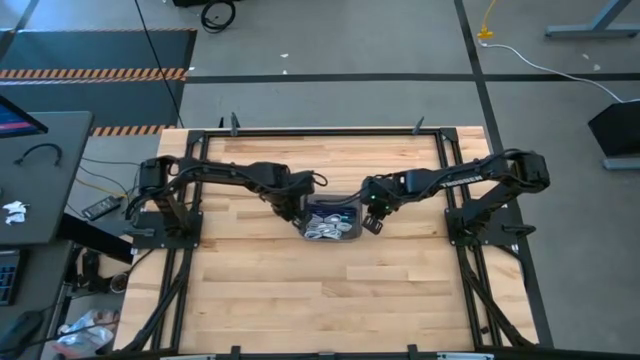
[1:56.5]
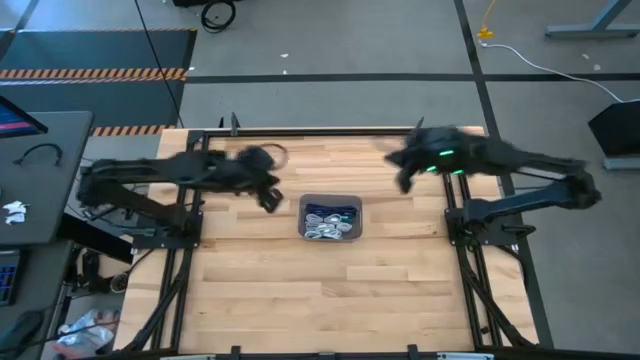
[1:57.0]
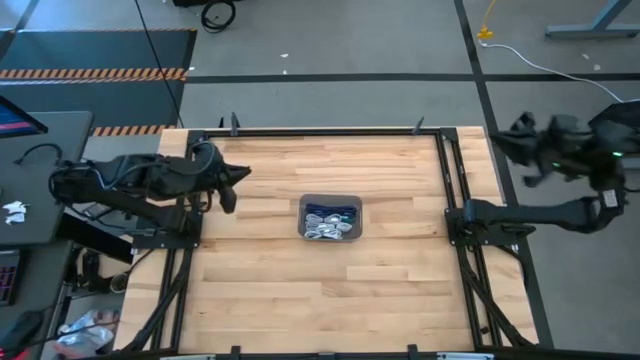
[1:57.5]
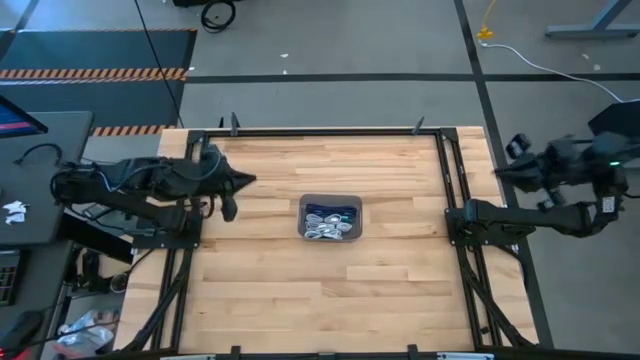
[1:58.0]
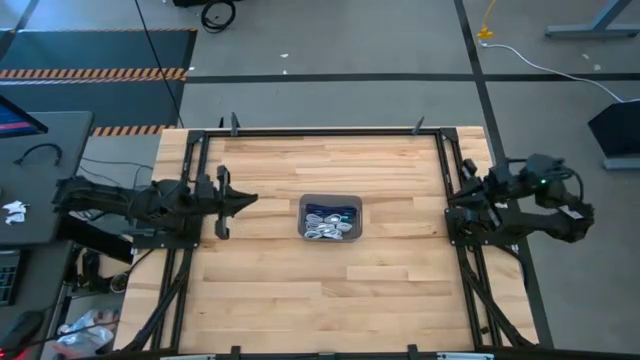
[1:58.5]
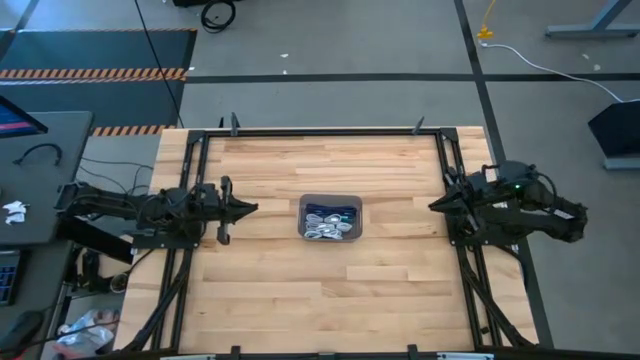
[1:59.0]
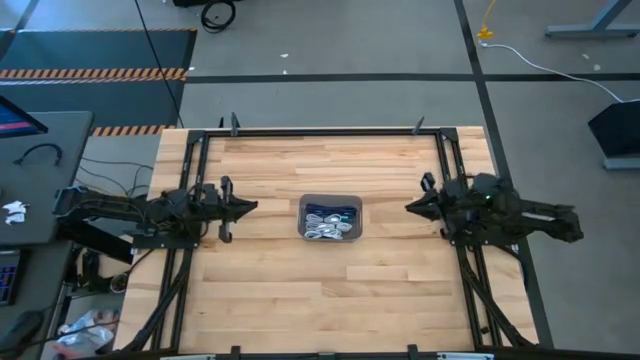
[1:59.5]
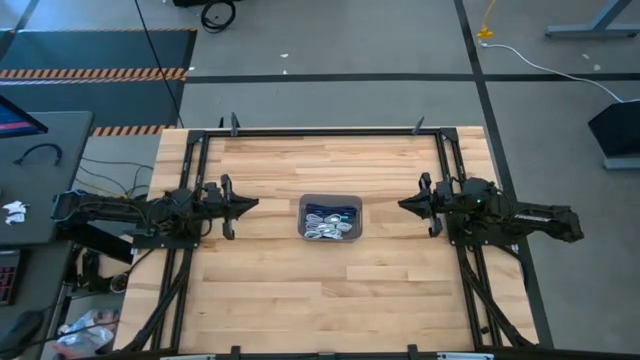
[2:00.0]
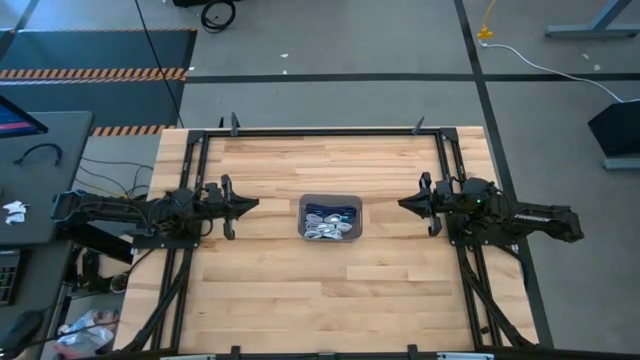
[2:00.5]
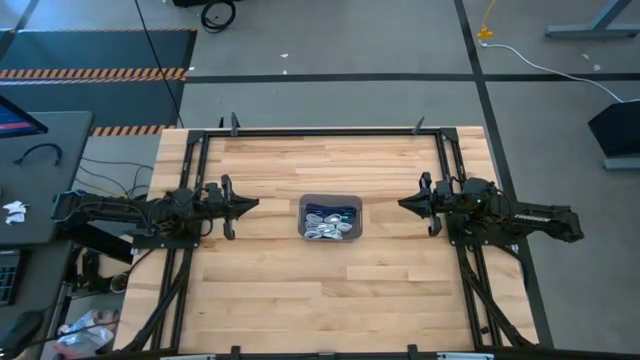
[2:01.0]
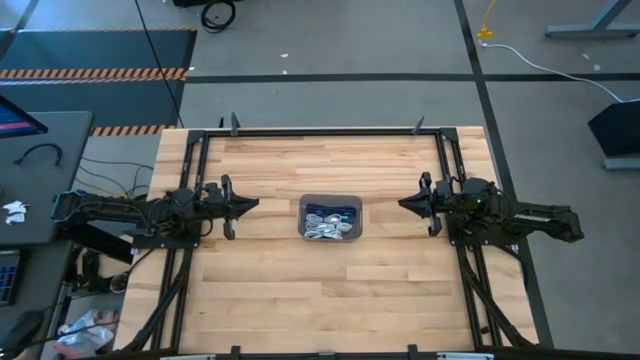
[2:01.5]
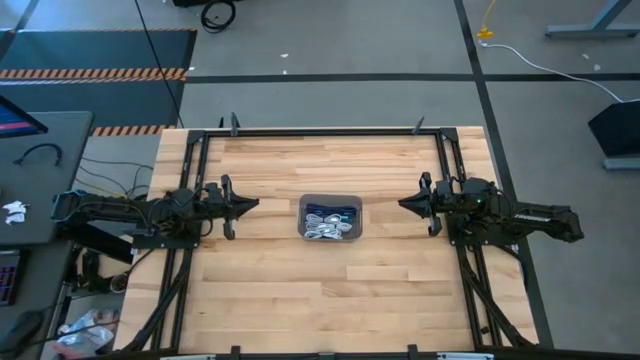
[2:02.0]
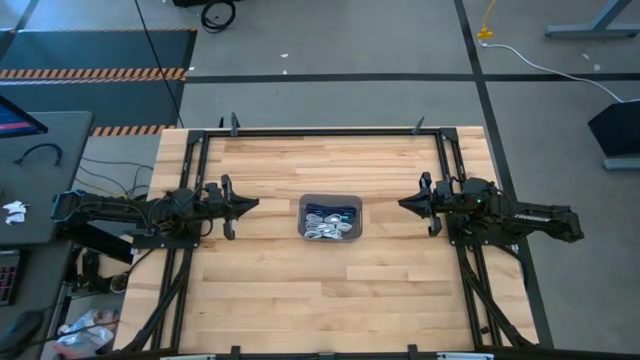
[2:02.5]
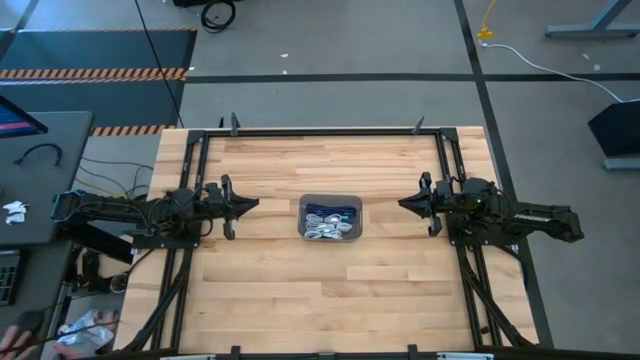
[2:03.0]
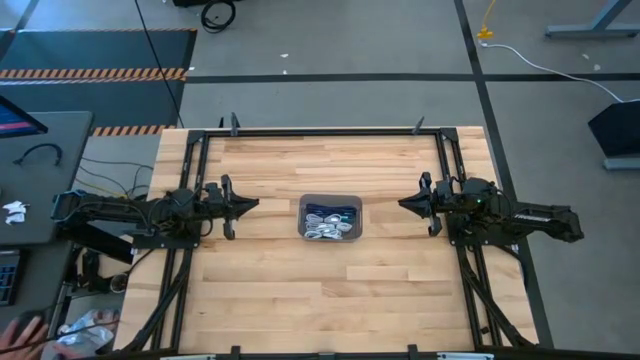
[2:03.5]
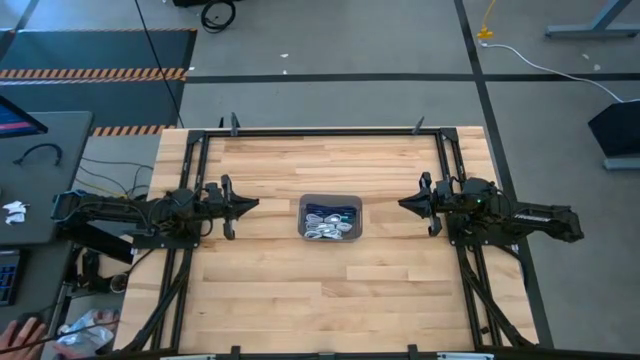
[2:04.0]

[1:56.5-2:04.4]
Task: Pick and place USB-C Cables
Return to Home Position

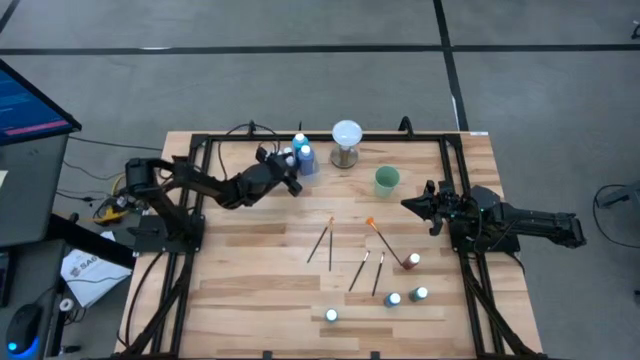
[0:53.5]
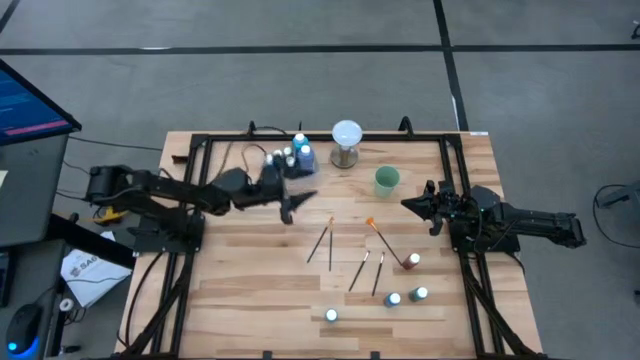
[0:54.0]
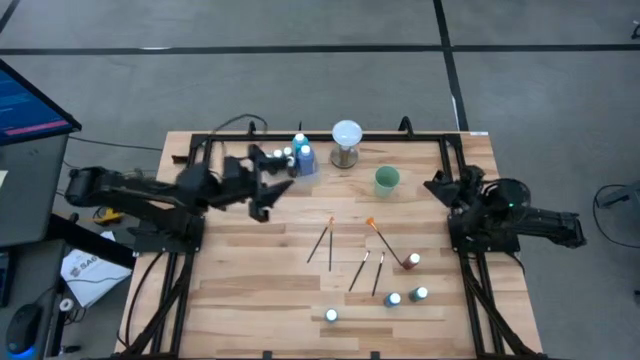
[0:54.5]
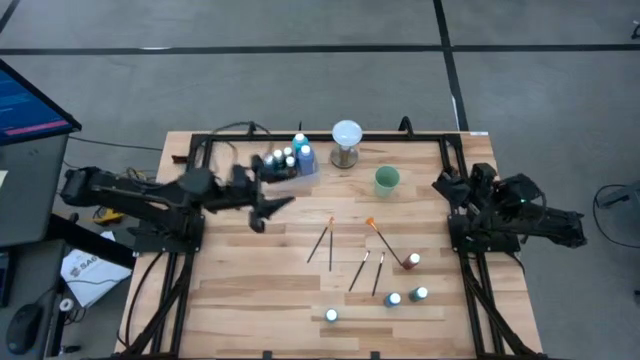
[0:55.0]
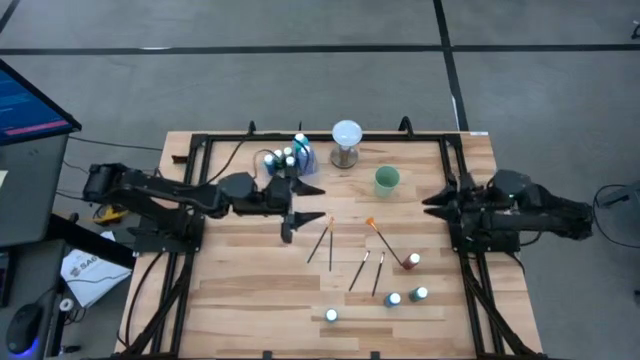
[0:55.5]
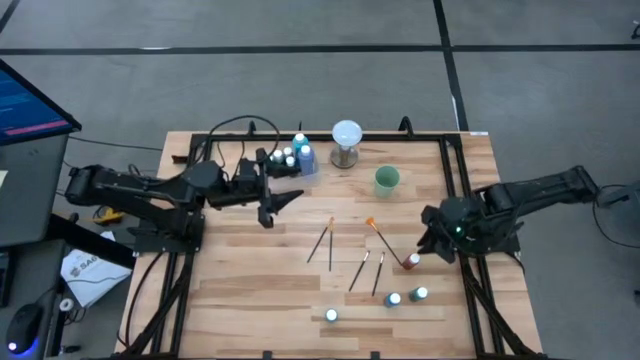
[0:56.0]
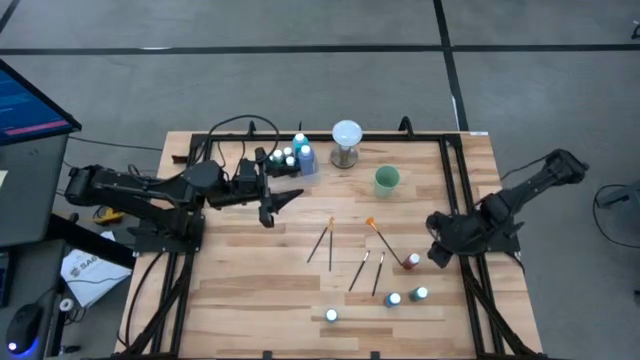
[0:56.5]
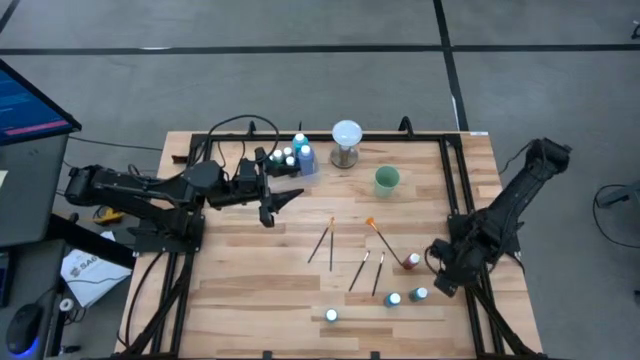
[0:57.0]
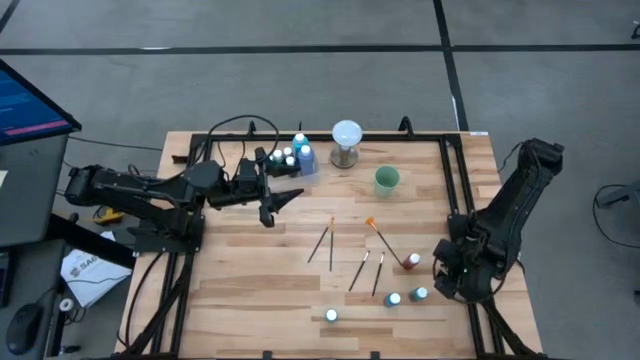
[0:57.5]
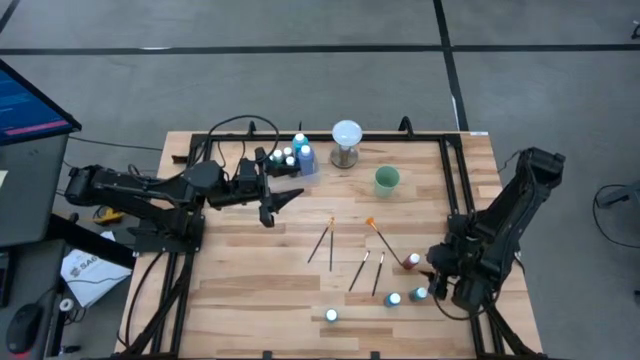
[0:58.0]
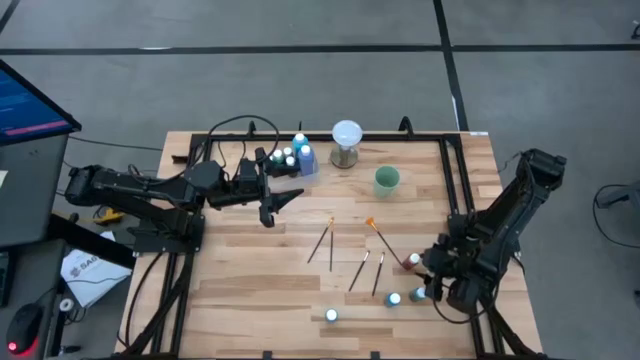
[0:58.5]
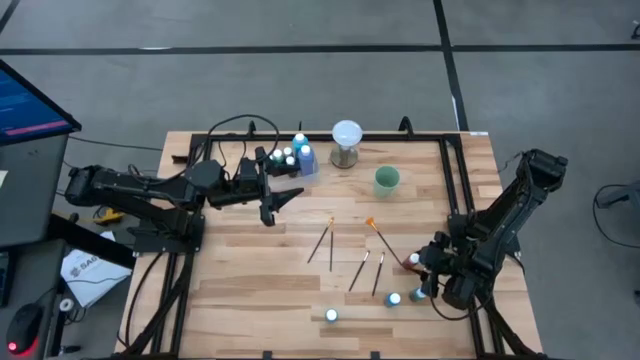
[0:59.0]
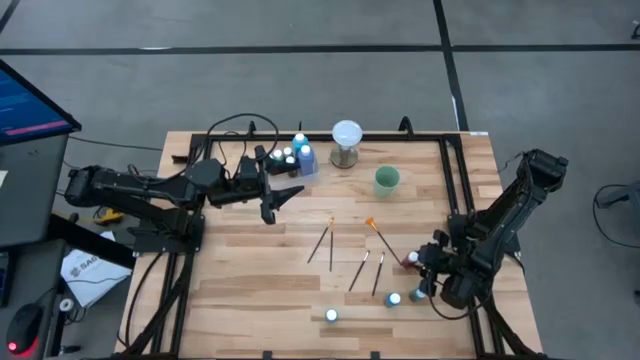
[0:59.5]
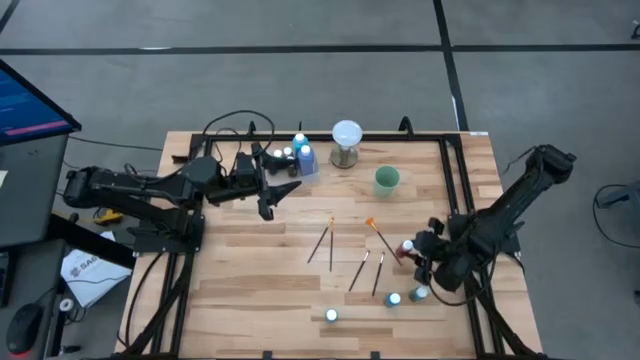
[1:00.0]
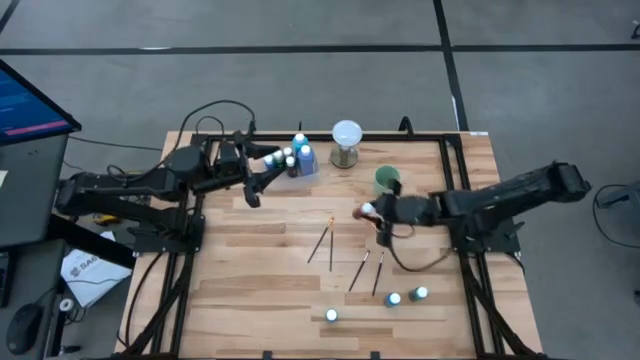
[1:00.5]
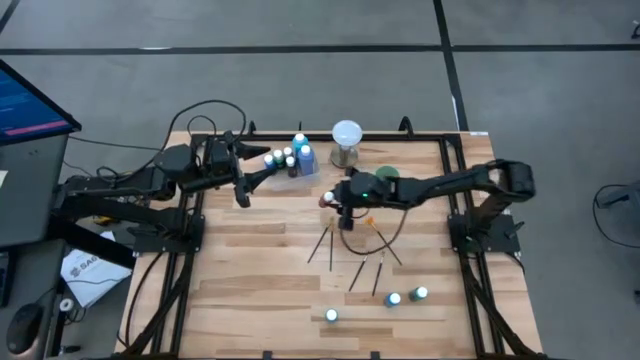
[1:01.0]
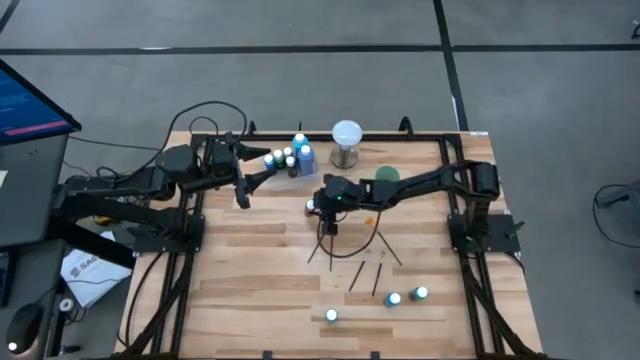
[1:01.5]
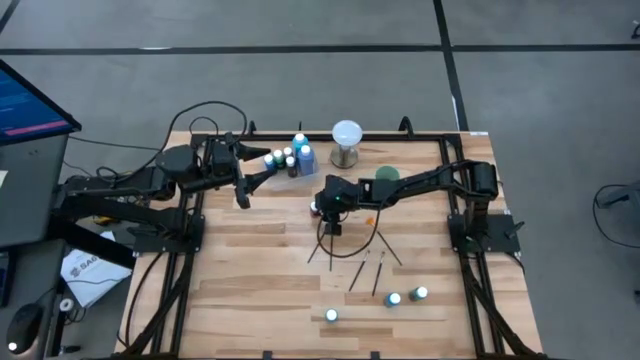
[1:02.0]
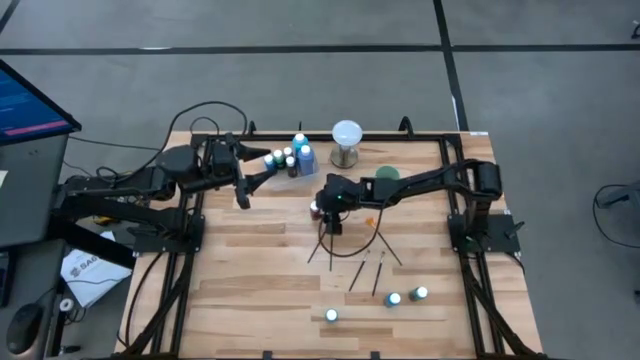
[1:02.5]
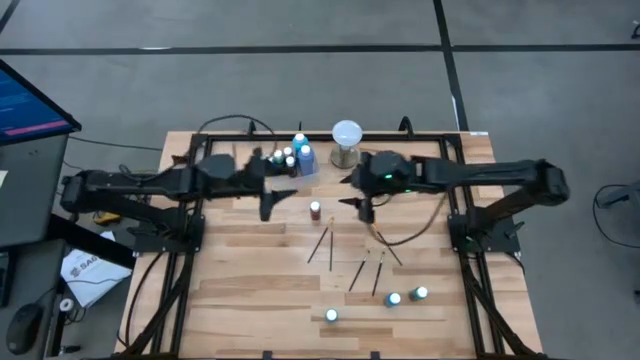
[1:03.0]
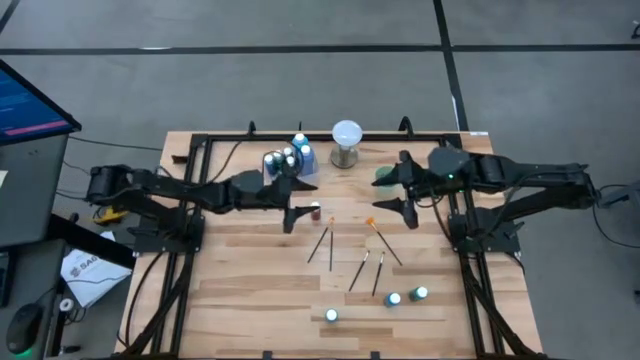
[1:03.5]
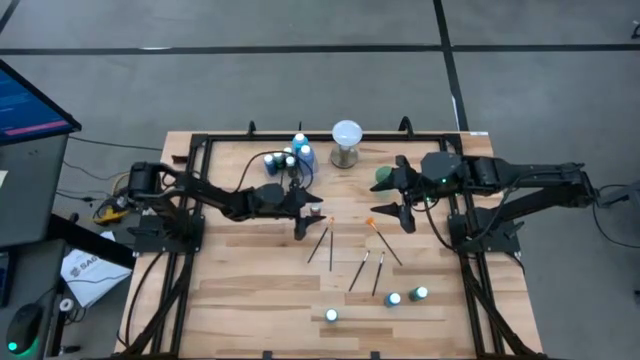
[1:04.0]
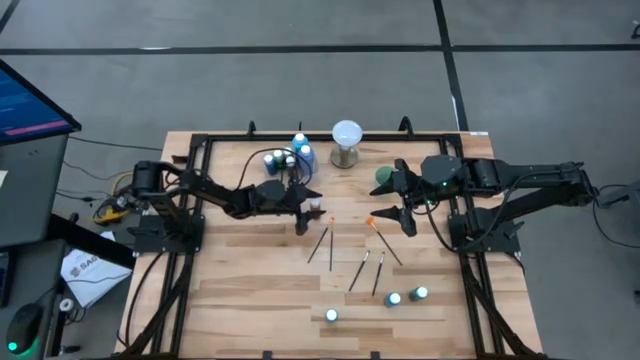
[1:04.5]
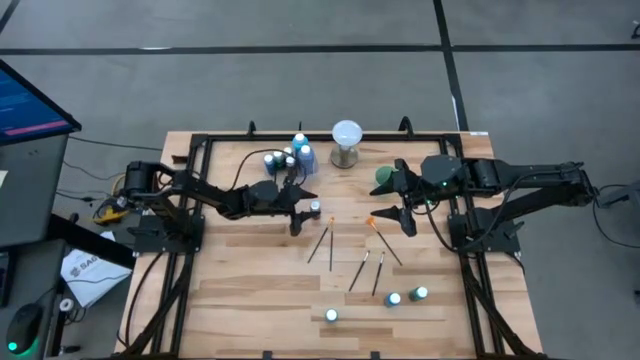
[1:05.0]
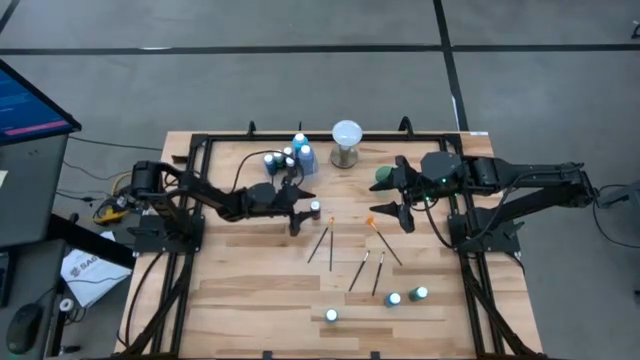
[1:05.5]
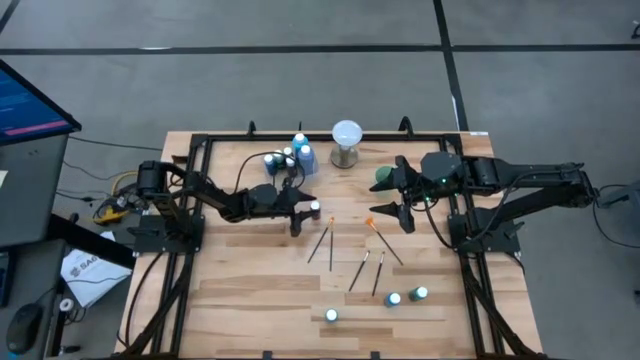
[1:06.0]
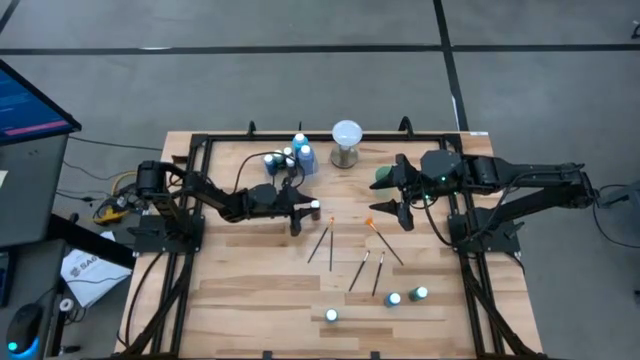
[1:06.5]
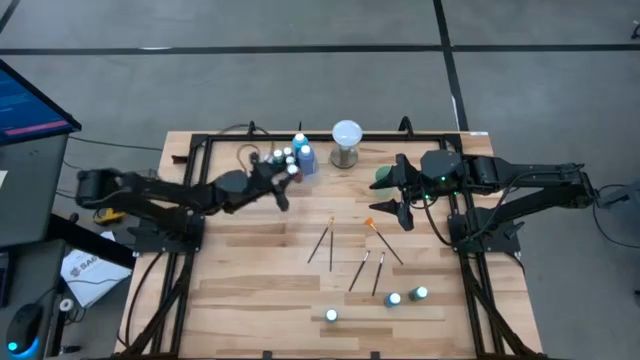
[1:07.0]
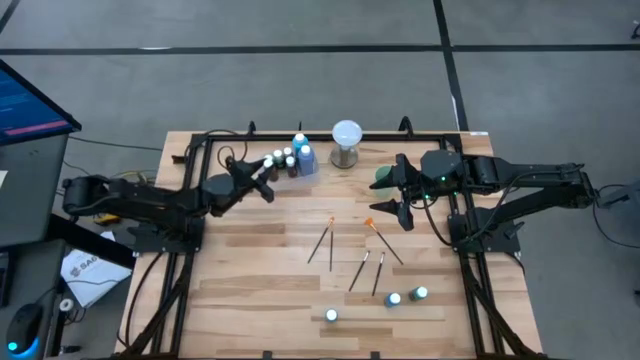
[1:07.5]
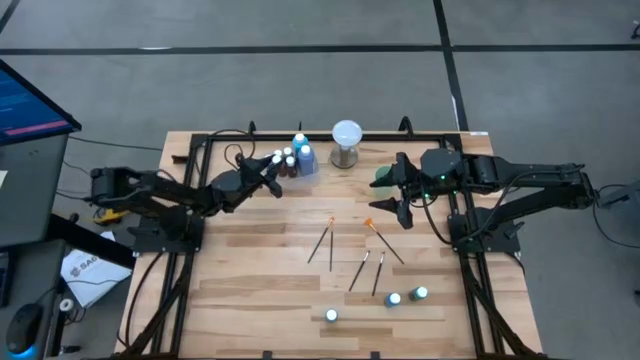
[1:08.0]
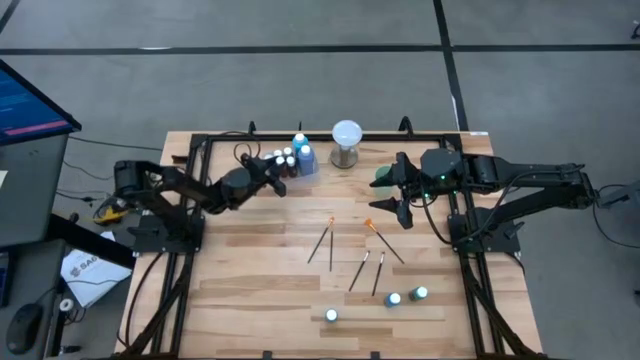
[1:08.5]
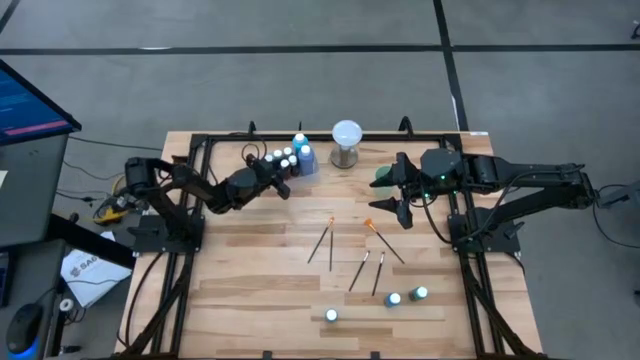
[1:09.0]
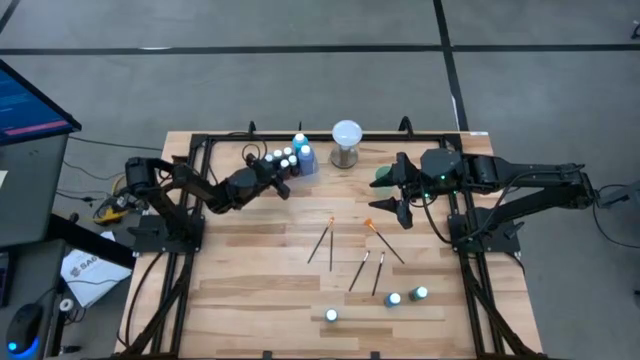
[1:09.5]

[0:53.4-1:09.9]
Task: Pick & Place Paint Supplies
Put the small red paint bottle into the transparent bin
